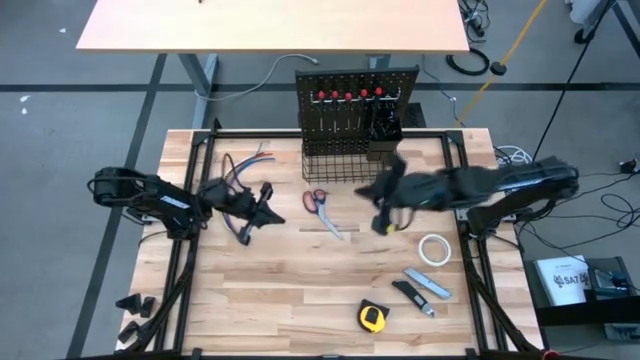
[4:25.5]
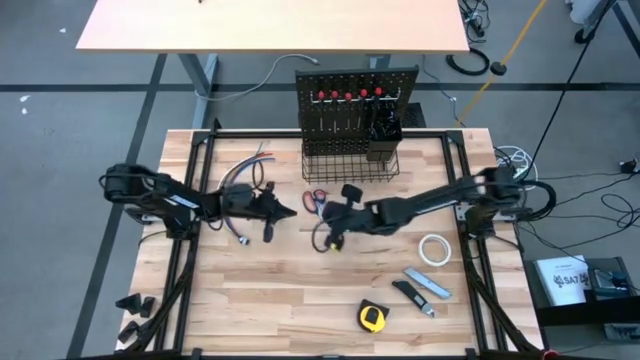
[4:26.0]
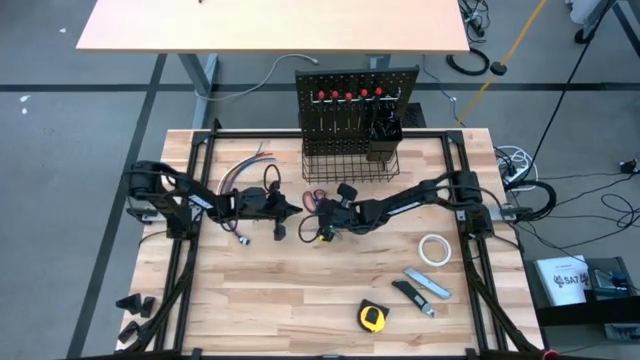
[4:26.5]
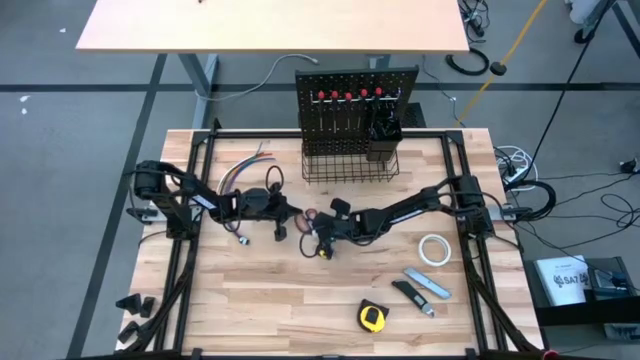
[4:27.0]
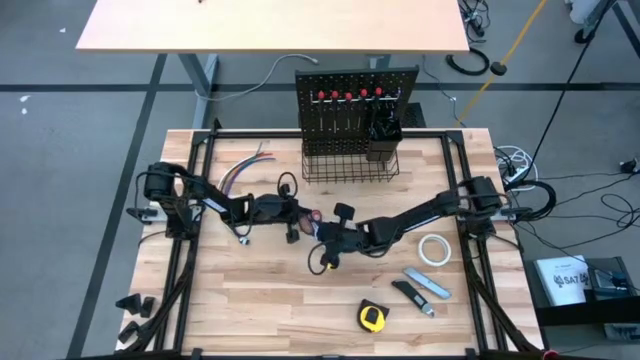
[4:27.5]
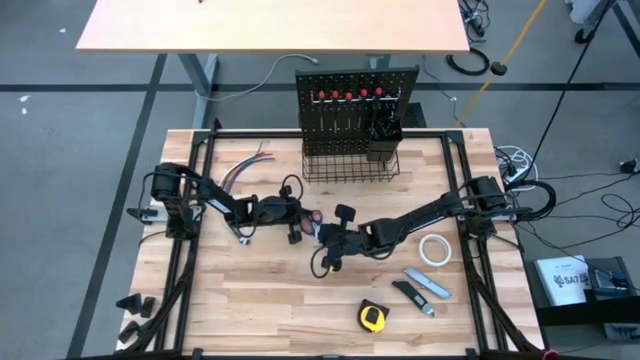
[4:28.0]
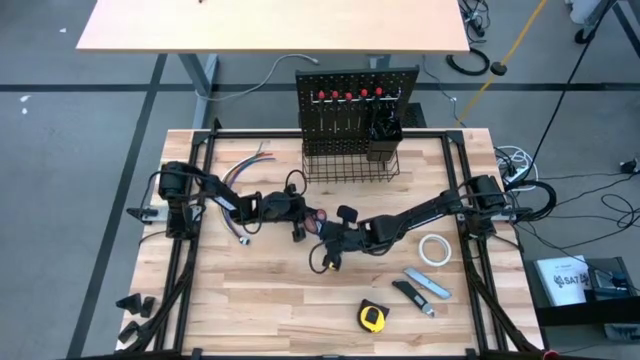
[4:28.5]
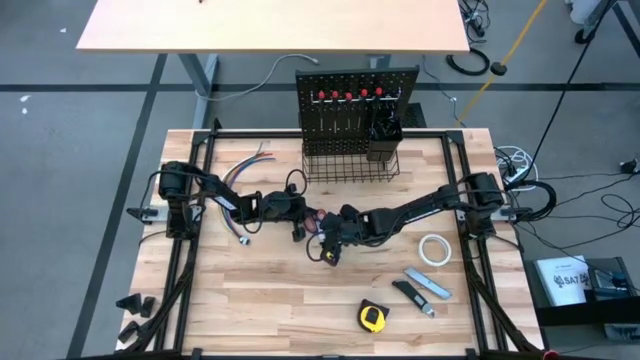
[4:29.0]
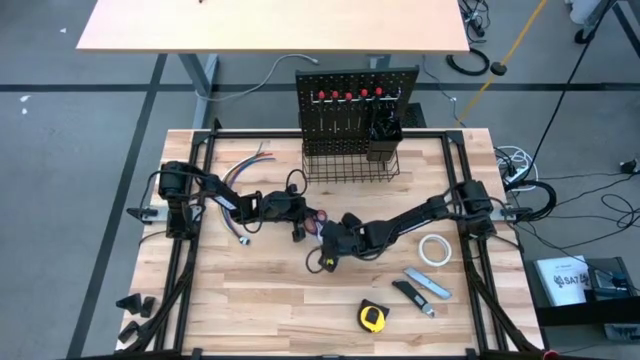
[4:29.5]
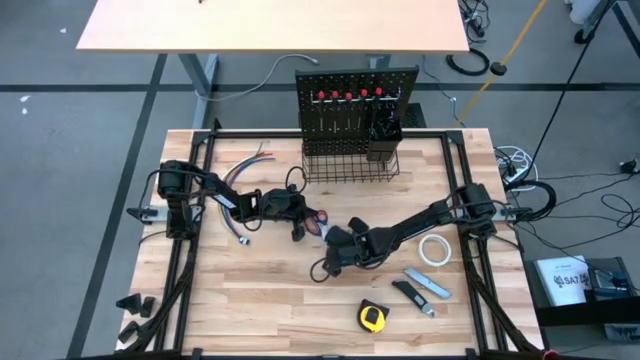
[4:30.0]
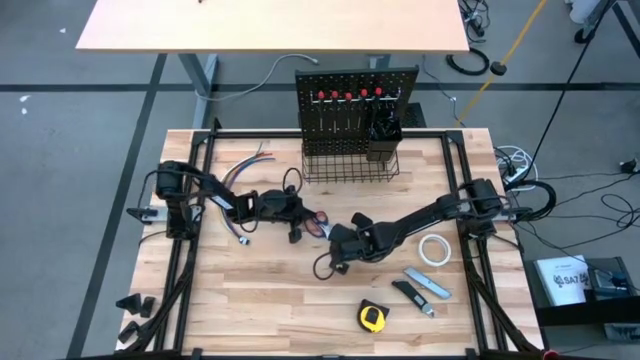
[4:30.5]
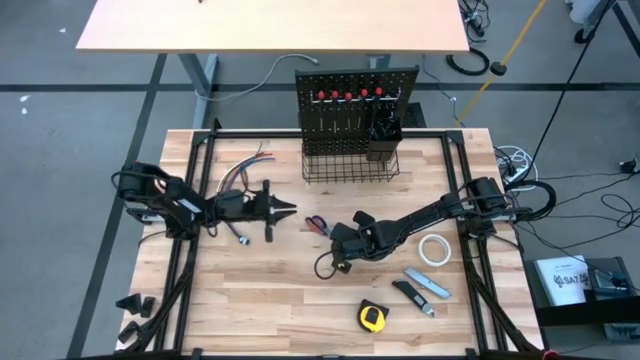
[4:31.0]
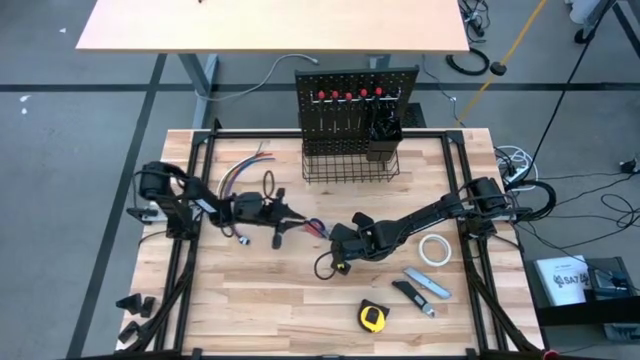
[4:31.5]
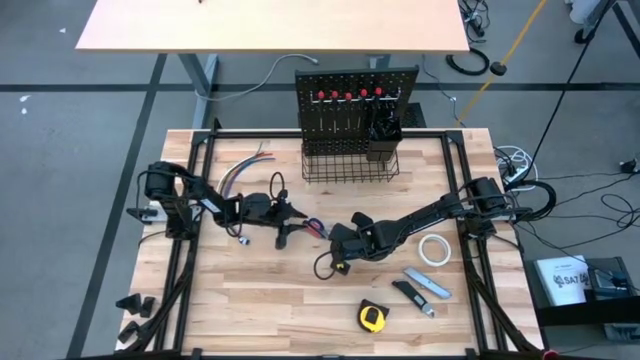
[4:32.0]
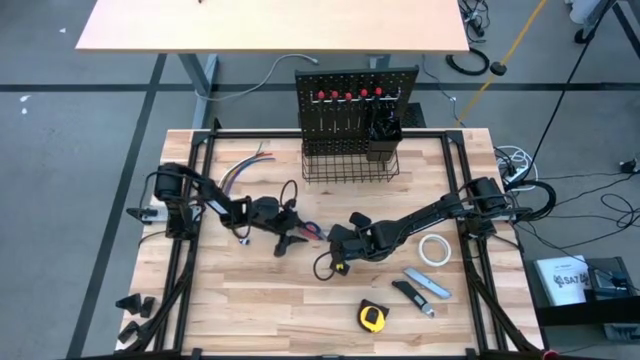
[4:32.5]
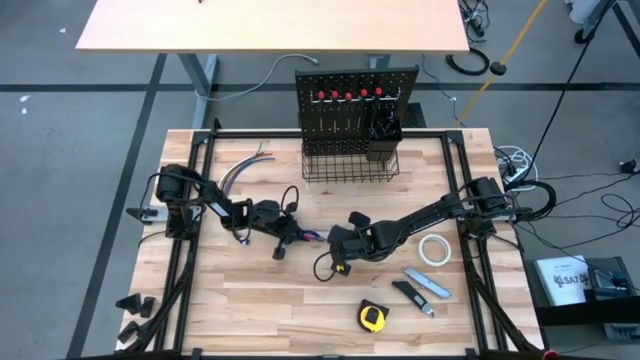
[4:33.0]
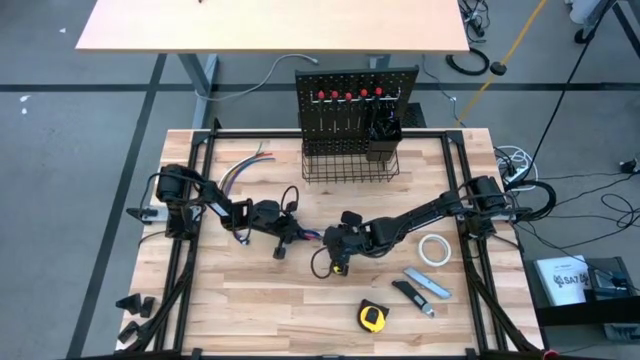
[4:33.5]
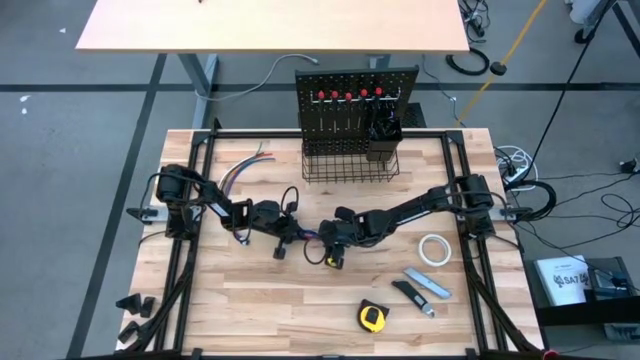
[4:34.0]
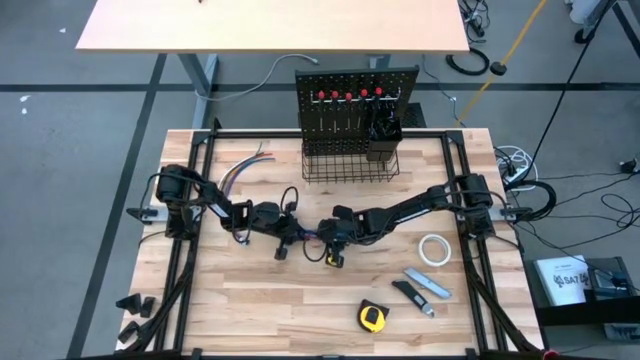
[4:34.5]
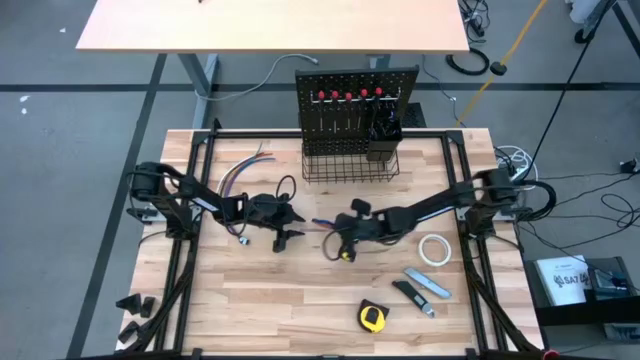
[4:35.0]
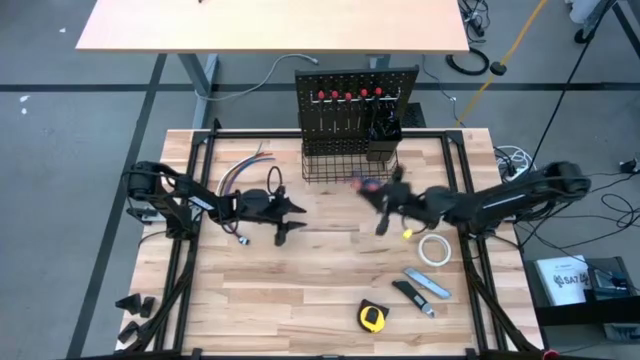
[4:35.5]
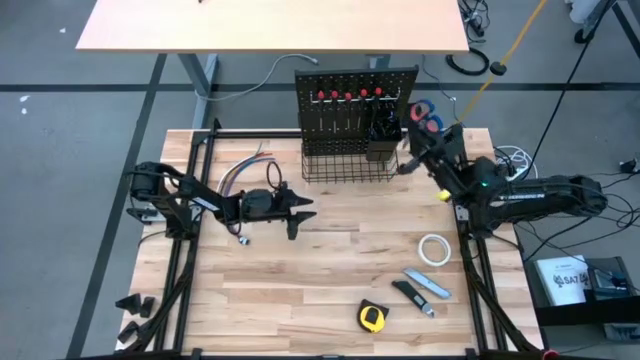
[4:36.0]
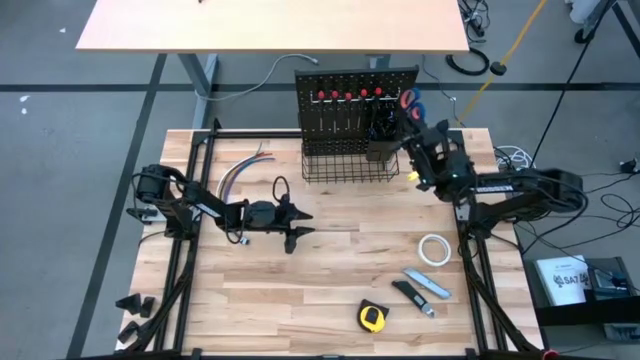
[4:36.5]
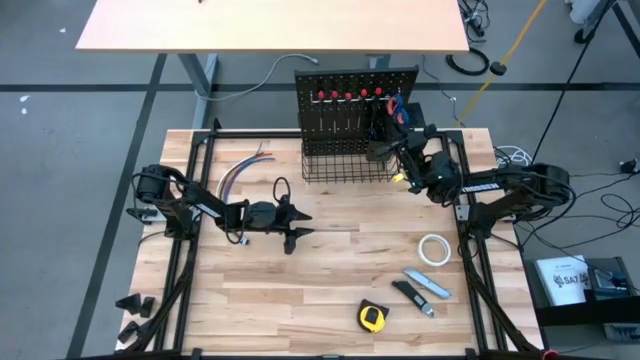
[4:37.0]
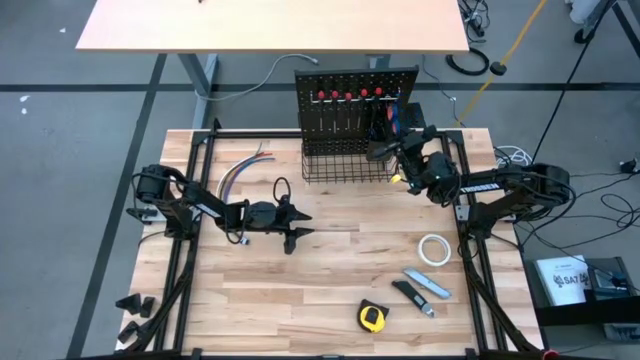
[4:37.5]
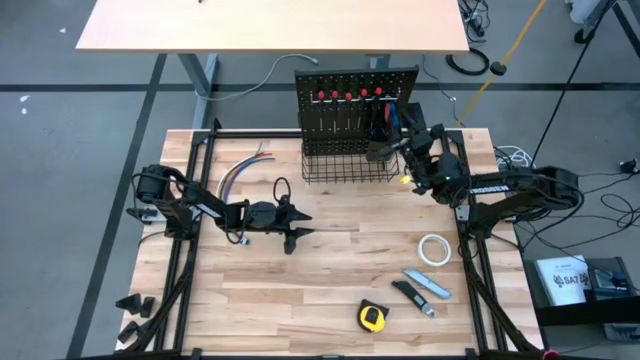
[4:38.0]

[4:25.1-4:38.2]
Task: Hang tools onto peg board
Put the scissor into the black bin on the pegboard

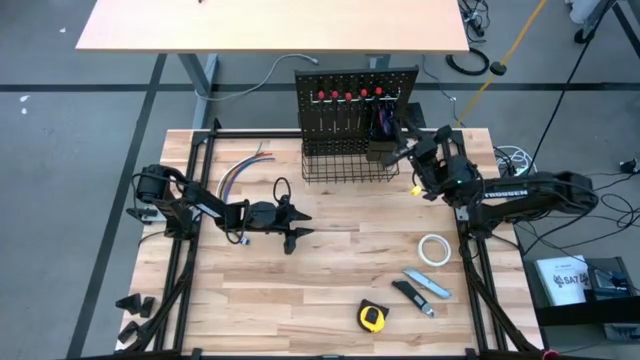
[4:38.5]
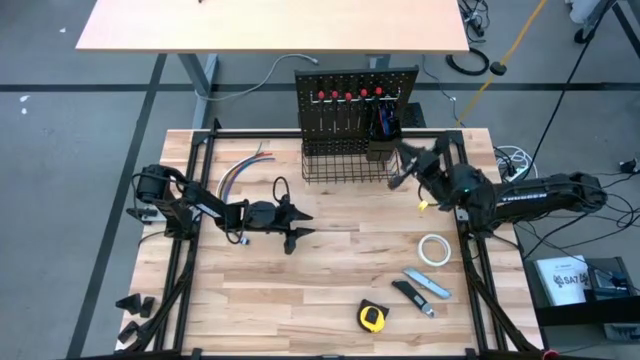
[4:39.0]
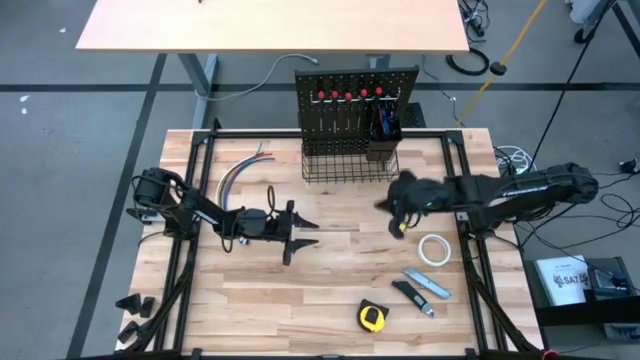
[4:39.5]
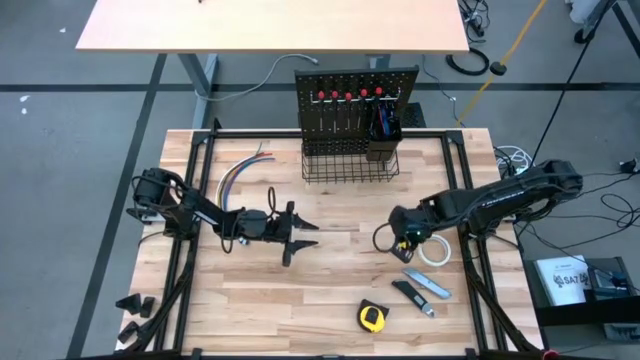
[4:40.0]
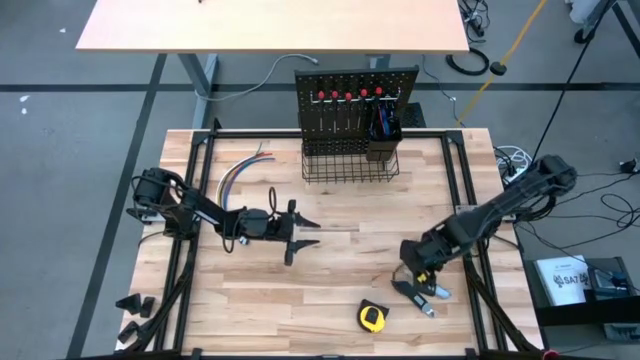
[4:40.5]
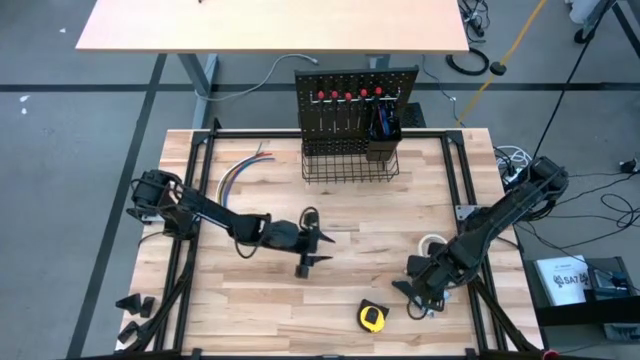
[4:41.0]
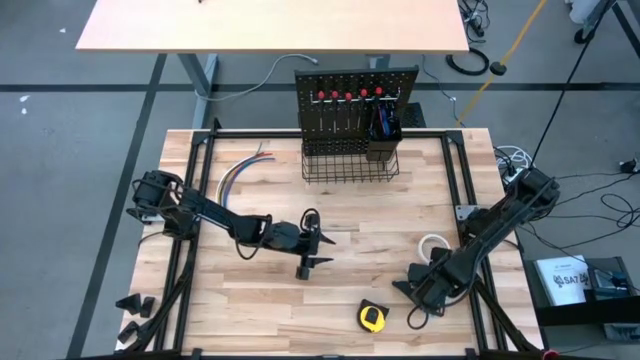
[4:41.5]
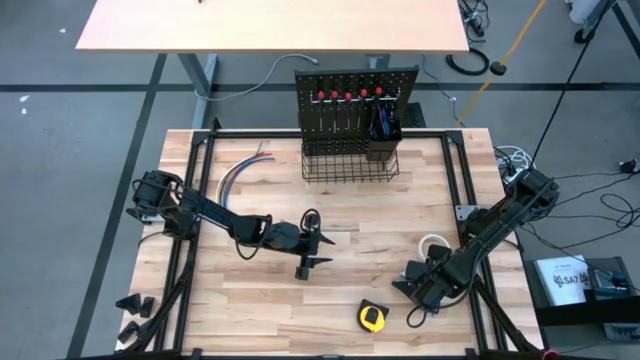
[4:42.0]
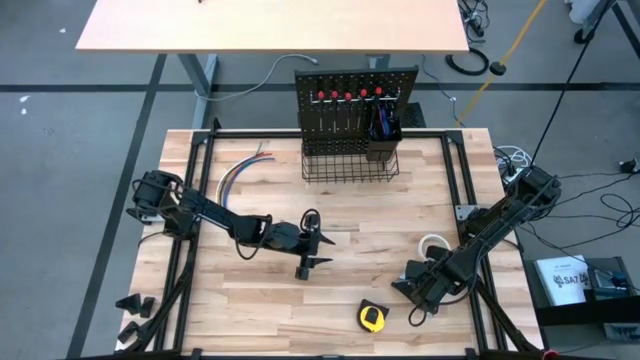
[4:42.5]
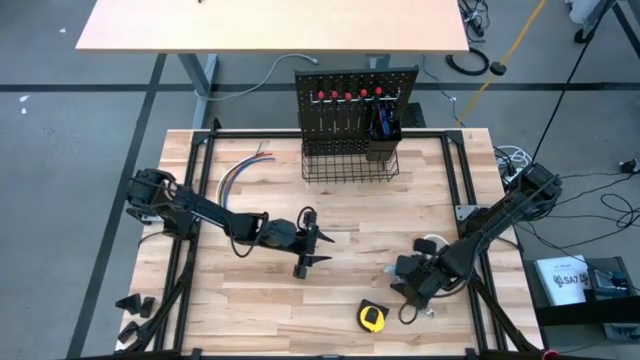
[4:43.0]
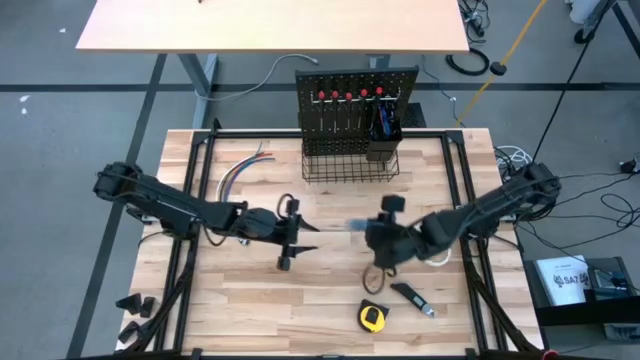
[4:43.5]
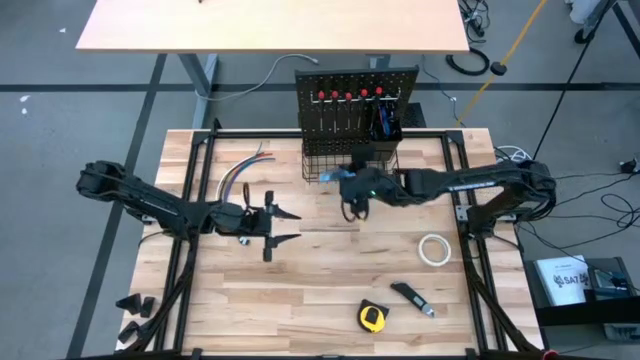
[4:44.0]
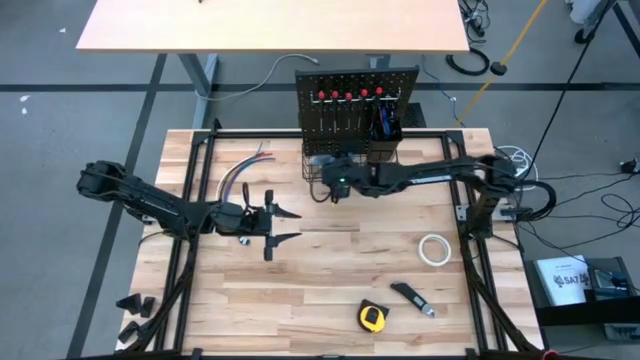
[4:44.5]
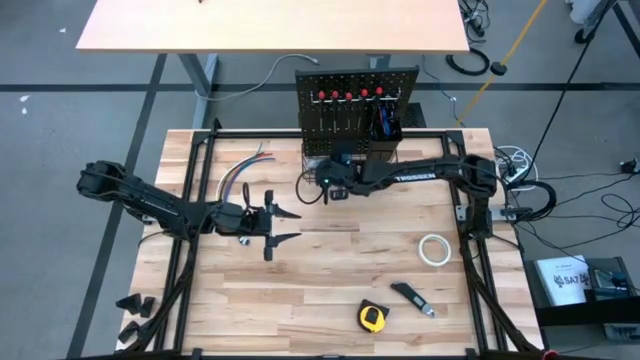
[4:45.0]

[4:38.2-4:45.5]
Put the silver cutter knife into the wire basket bin on the pegboard

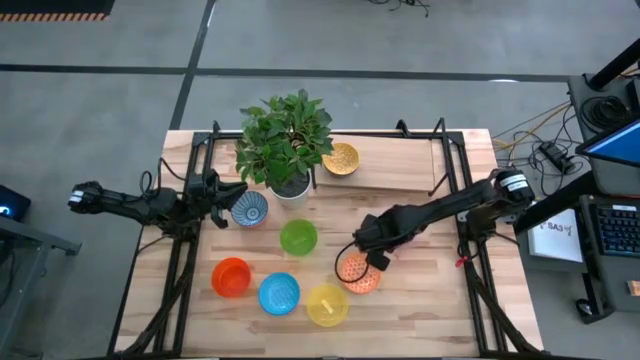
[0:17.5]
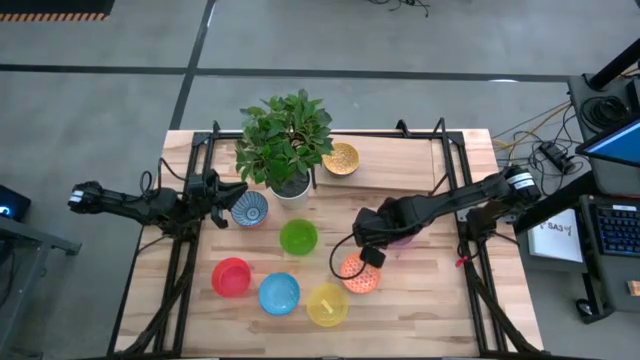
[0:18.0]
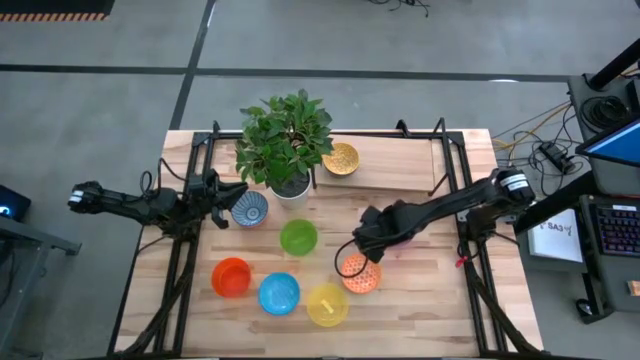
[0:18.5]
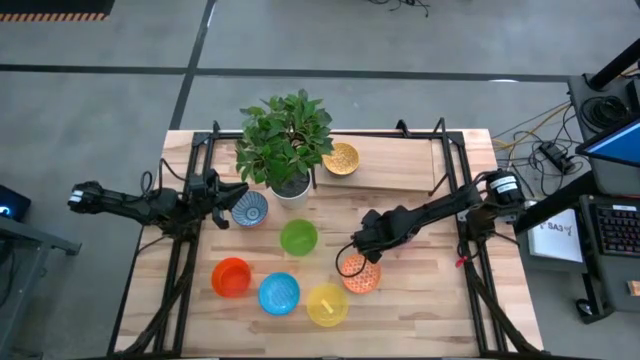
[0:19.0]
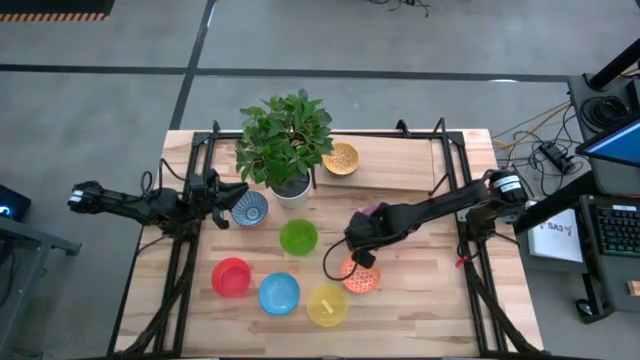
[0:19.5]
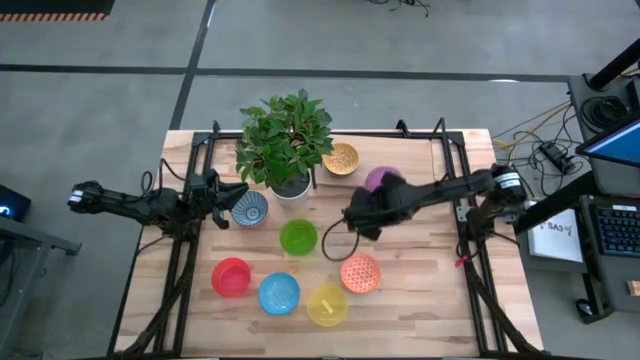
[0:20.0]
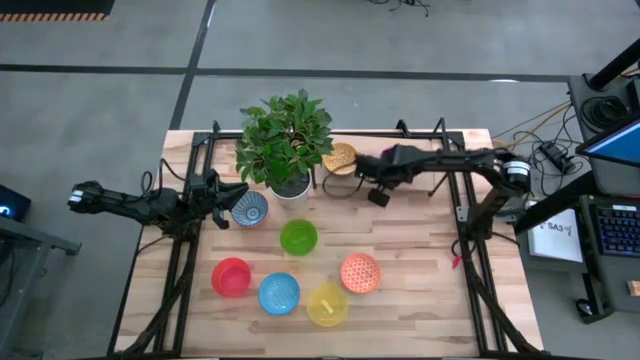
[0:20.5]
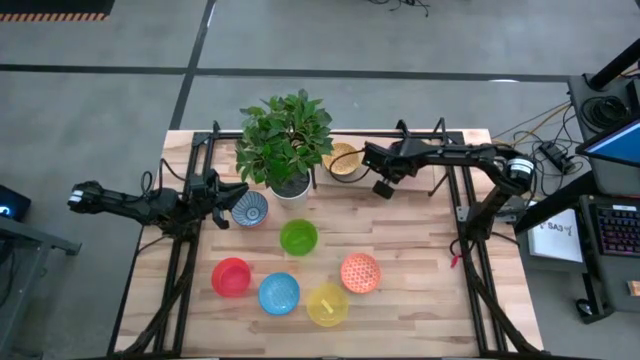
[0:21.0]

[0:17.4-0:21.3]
Task: Place and stack bowls onto a shelf
Put the purple bowl on the shelf
